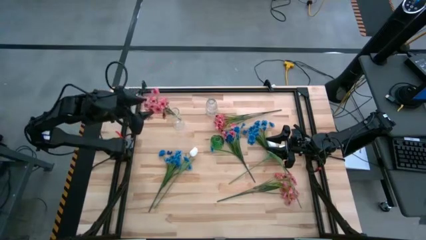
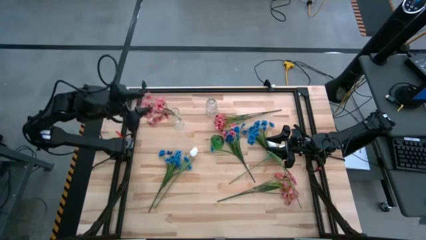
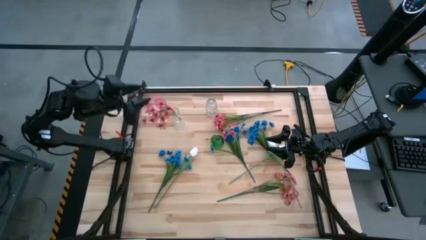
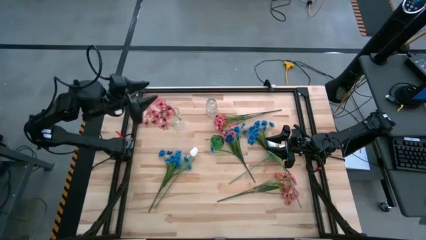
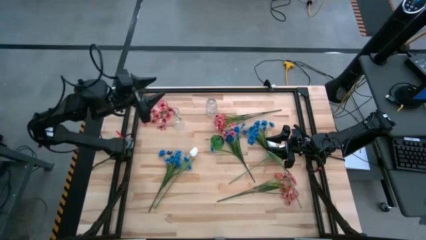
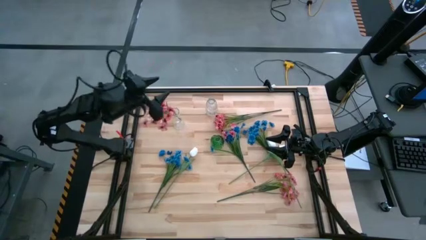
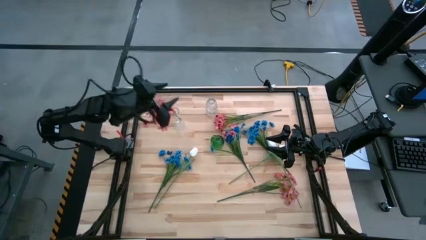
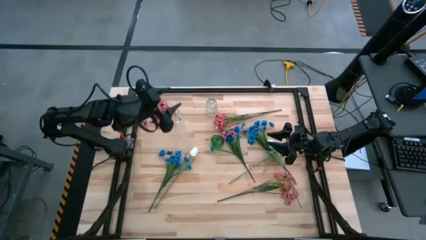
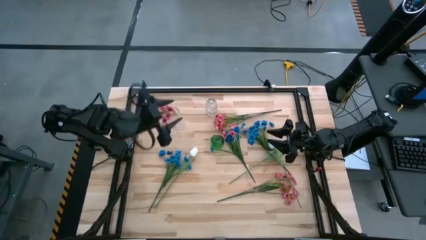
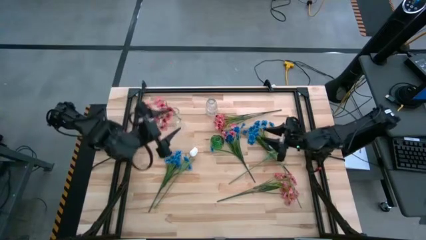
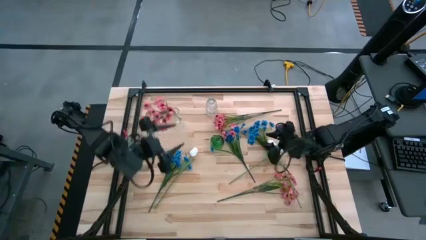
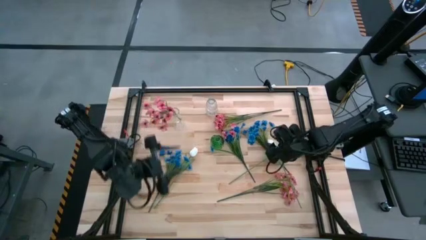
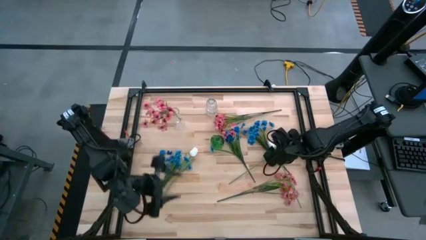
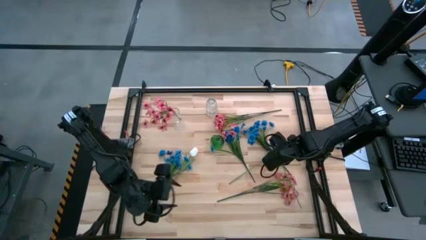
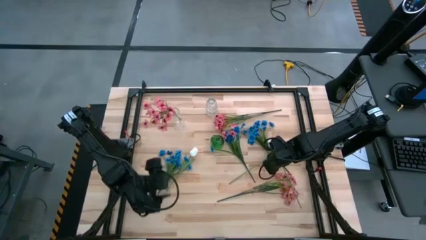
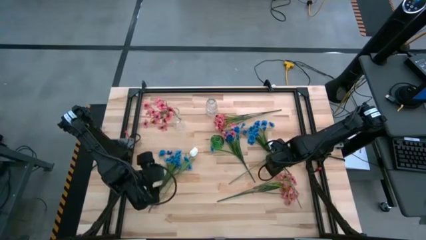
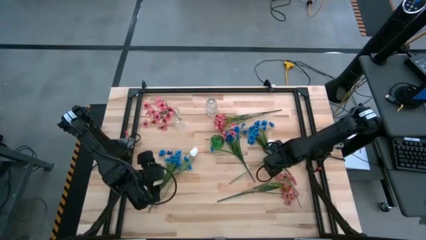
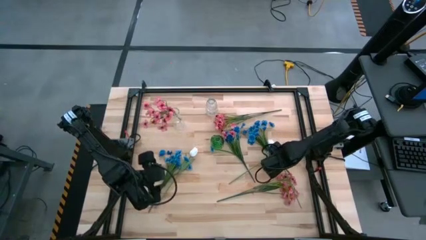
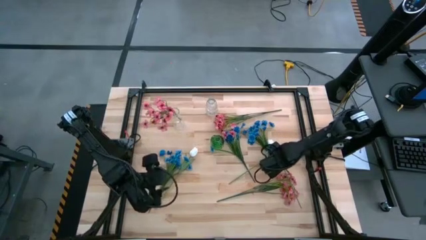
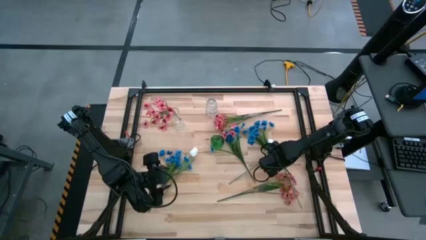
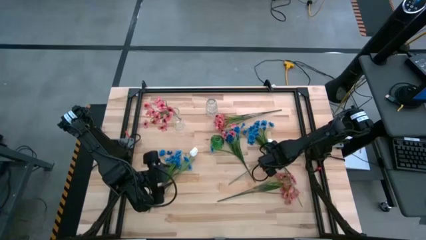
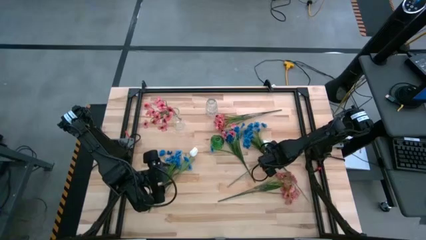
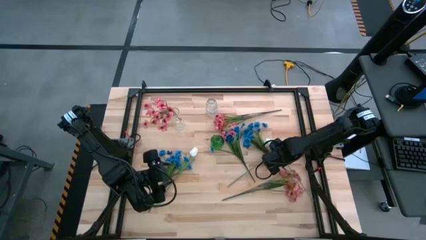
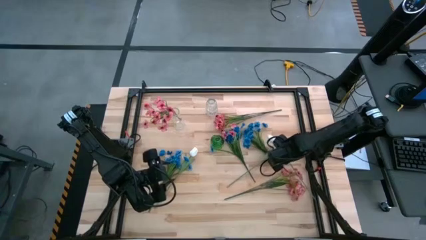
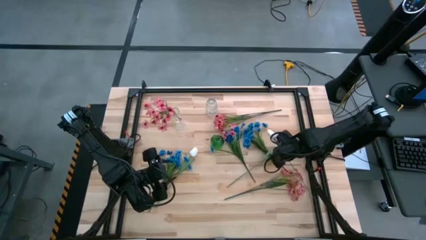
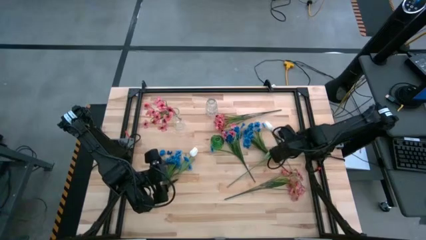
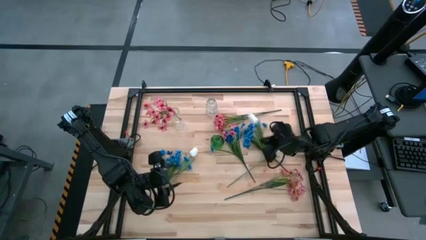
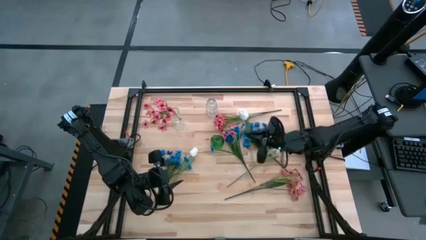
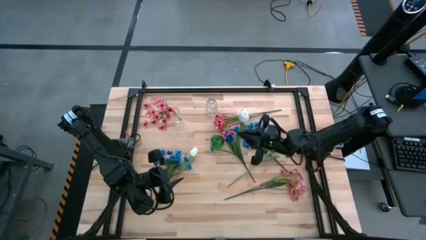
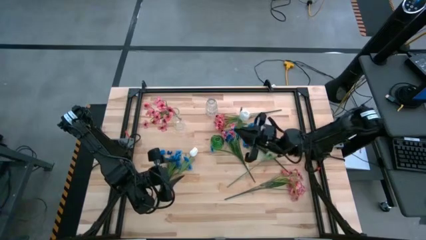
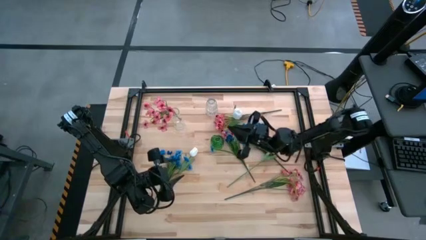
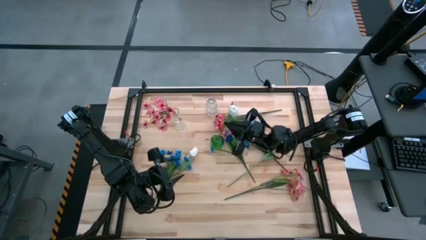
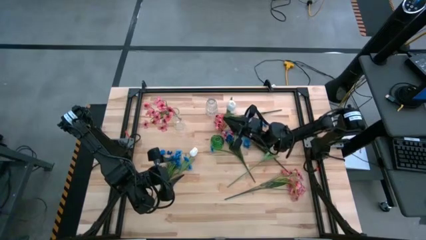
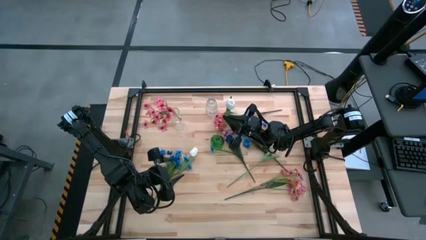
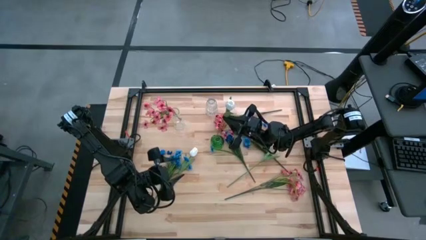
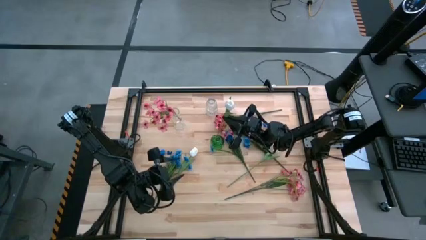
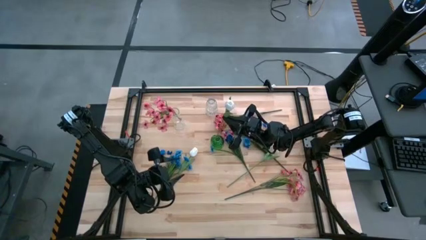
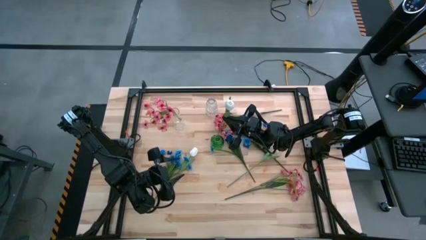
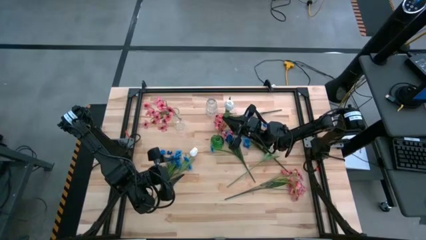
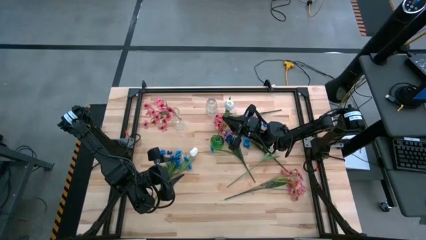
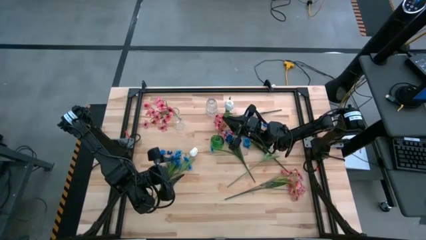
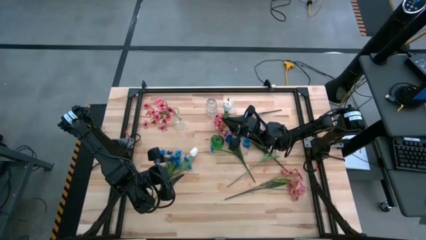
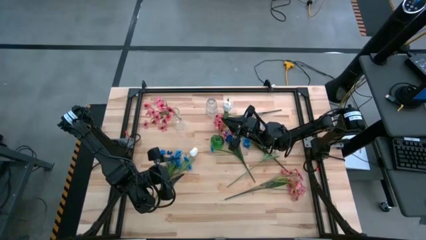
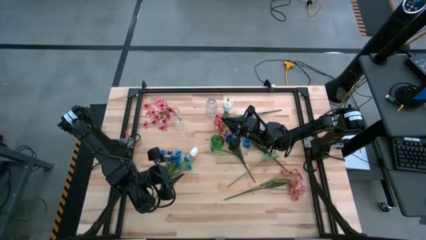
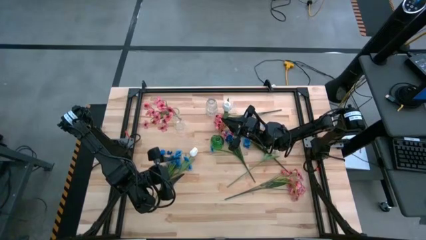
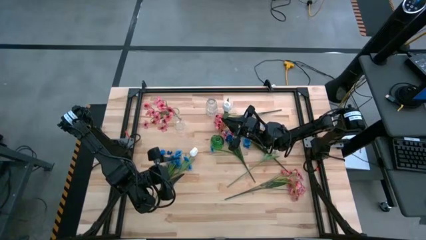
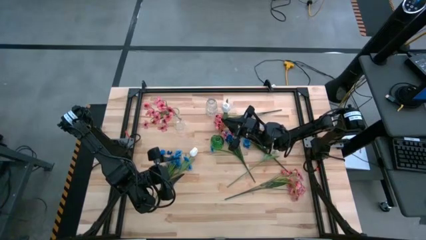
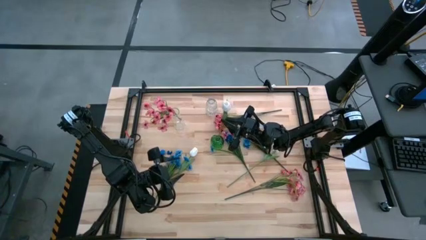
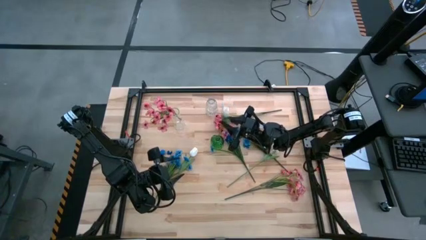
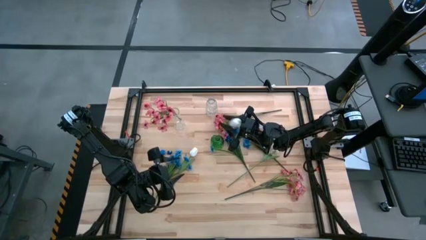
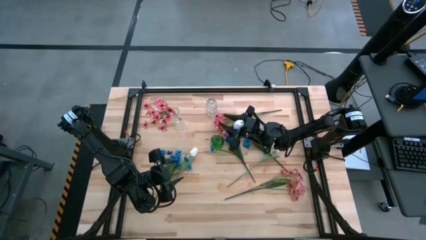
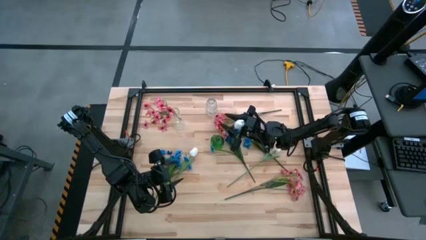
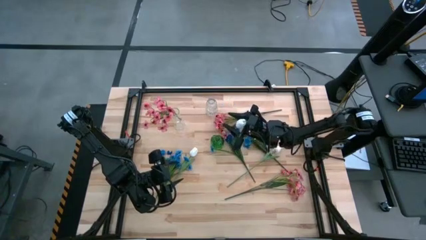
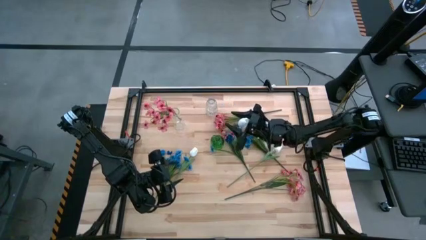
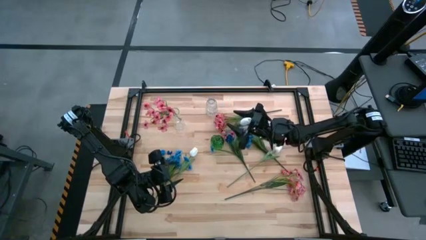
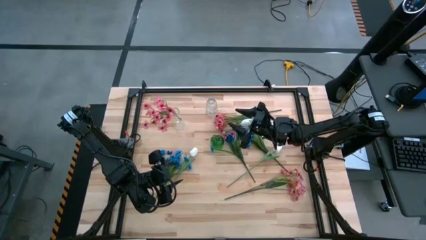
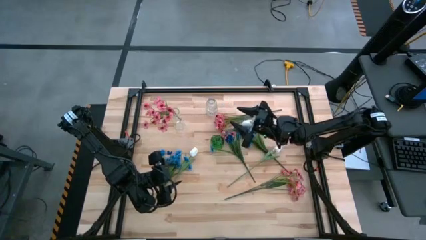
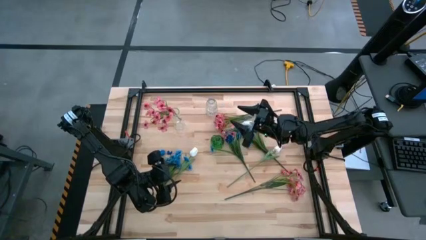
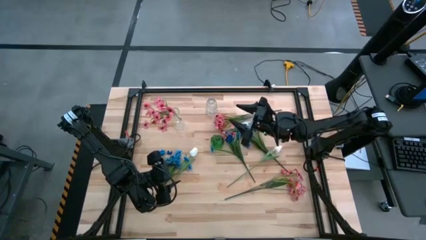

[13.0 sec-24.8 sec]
Task: Sort flowers into vase by color
Put the right white tulip flower into the green vase

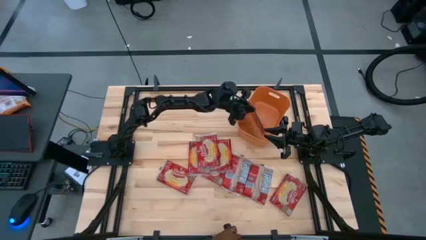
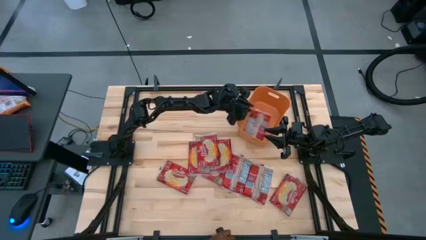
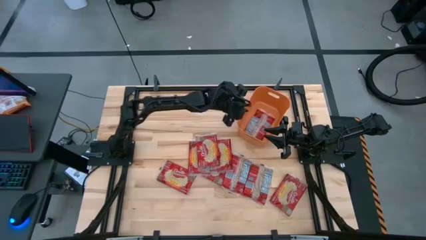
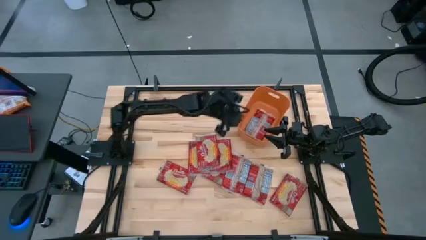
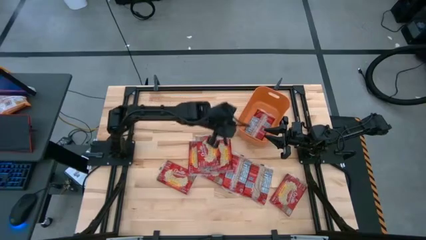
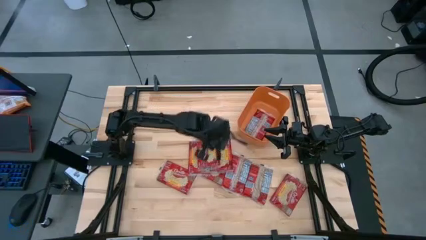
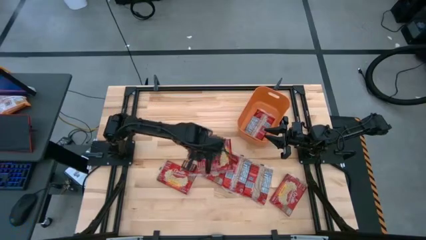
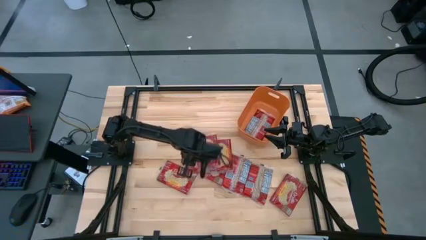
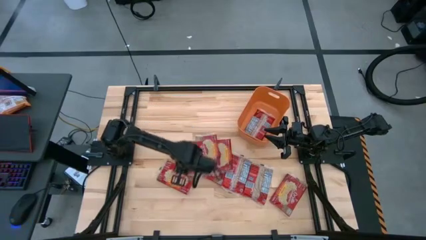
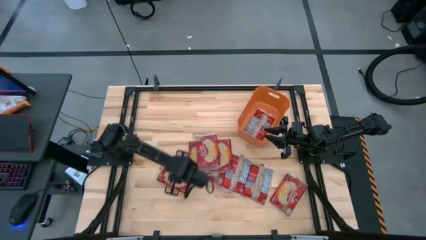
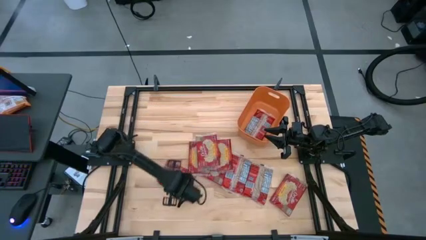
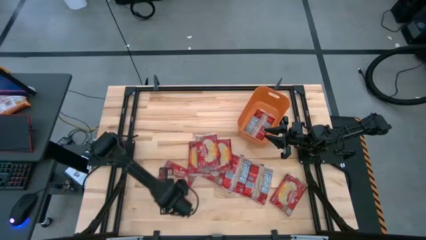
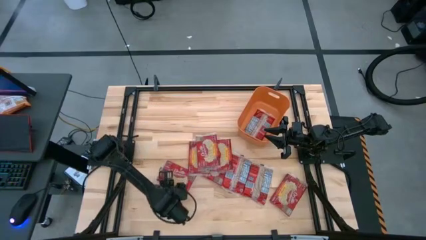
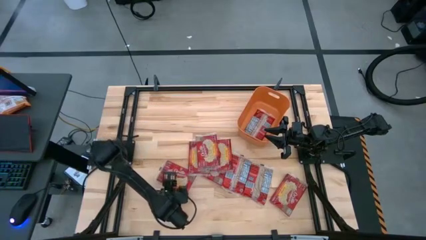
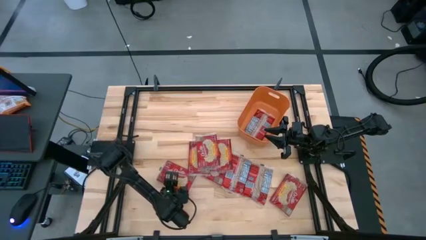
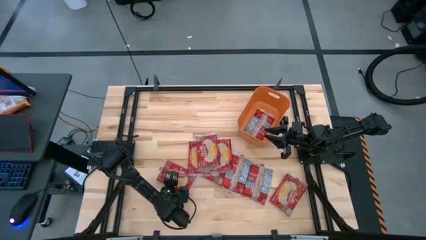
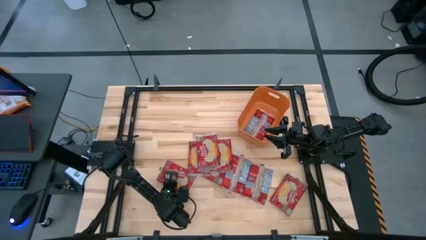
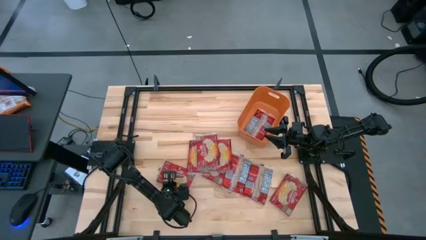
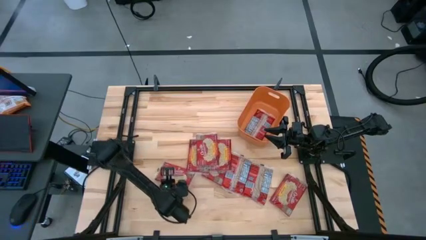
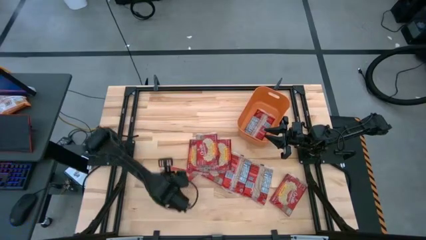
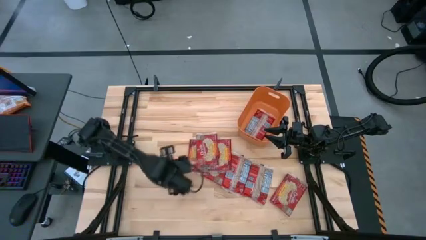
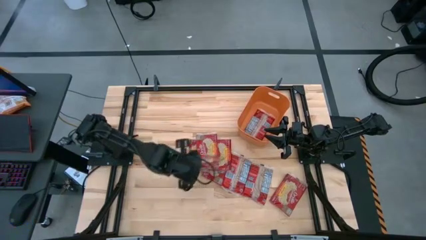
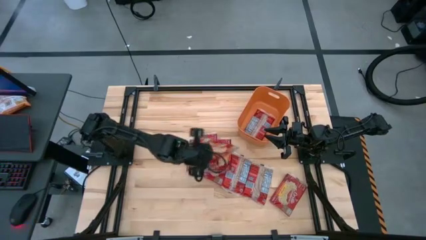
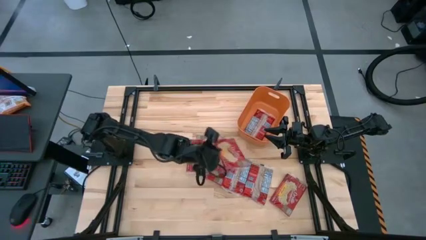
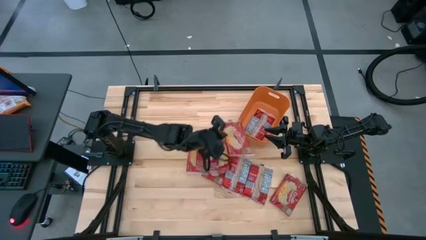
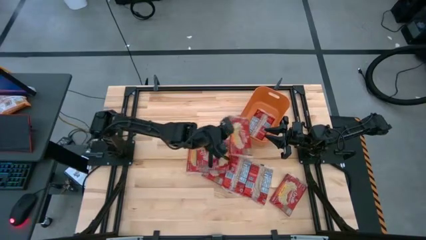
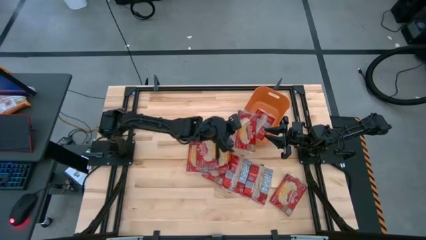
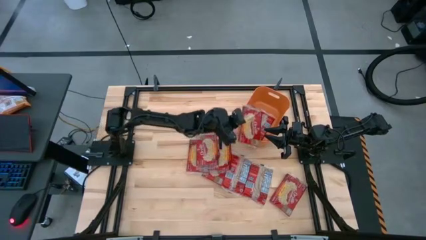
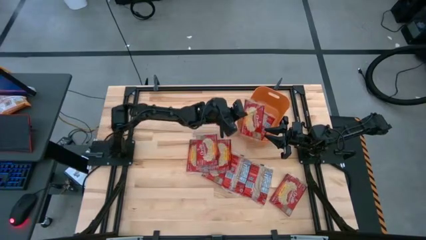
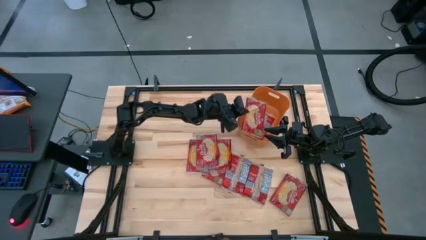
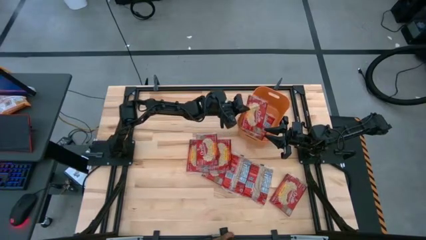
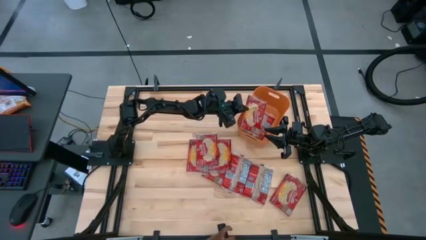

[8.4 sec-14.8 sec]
Task: Sort popcorn bags into baskets
Put the red popcorn bag into the orange bin
